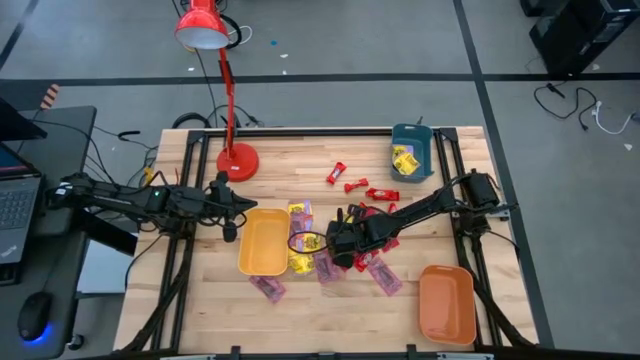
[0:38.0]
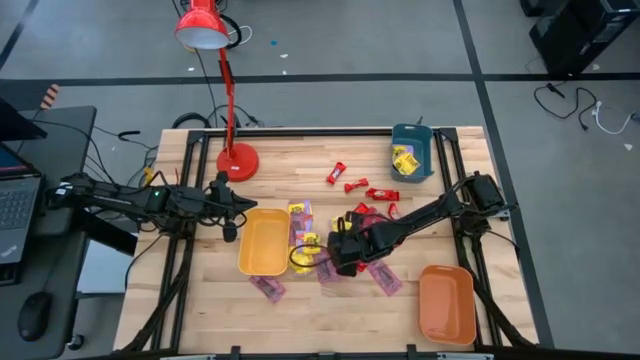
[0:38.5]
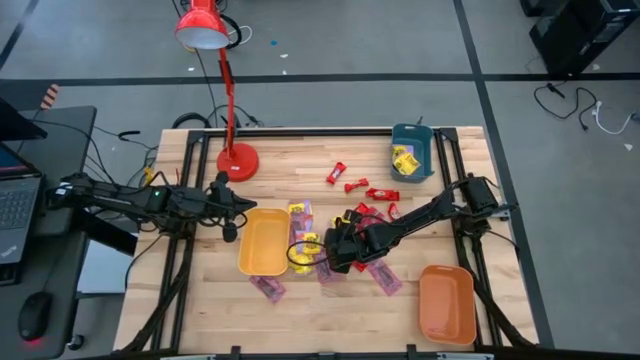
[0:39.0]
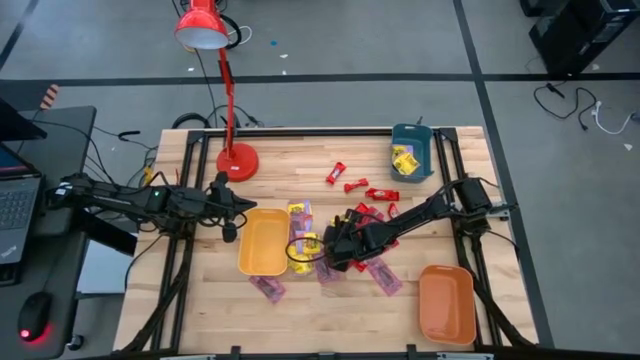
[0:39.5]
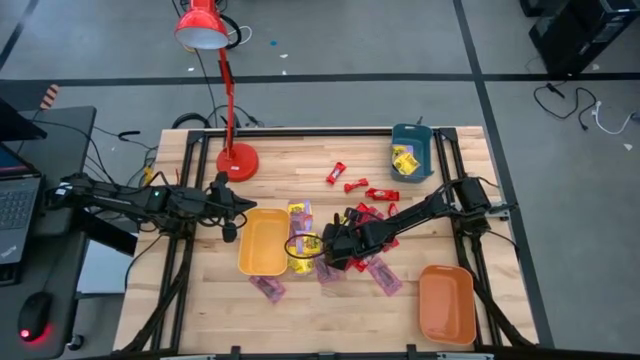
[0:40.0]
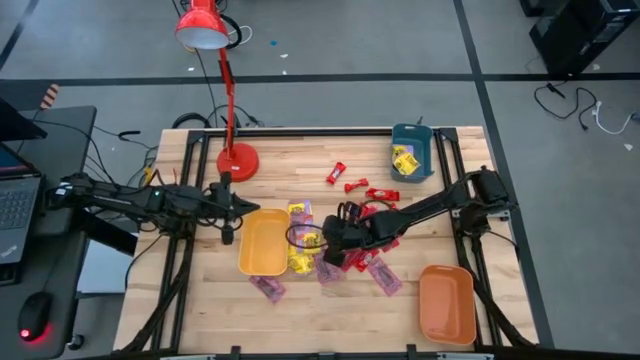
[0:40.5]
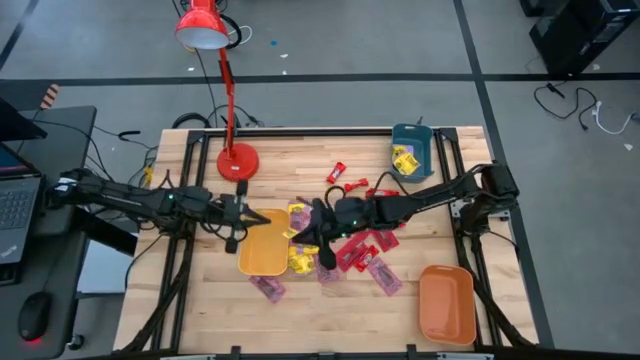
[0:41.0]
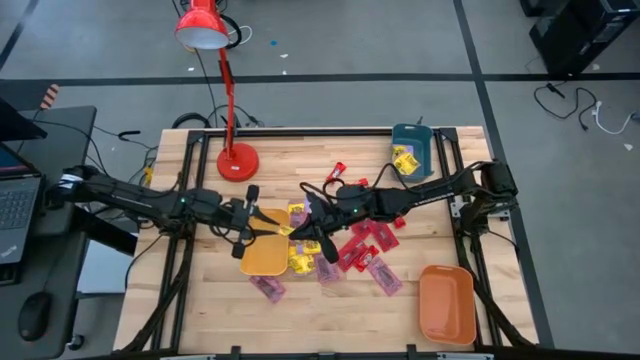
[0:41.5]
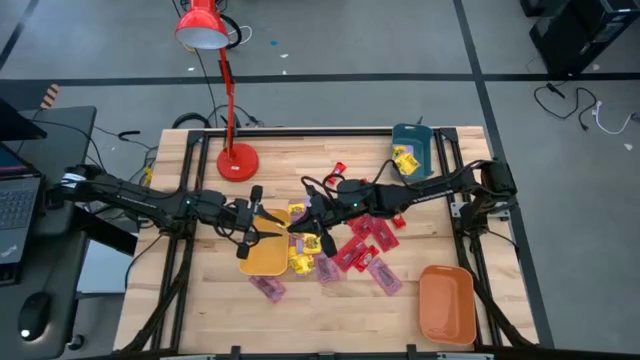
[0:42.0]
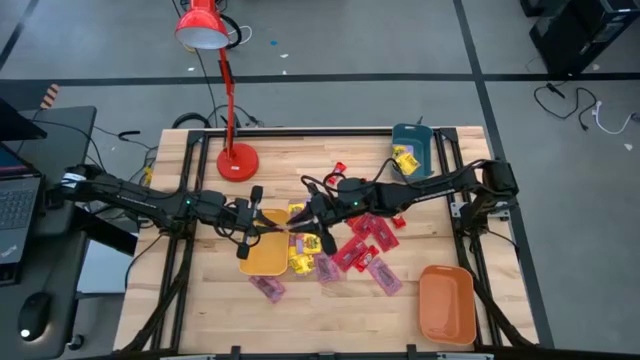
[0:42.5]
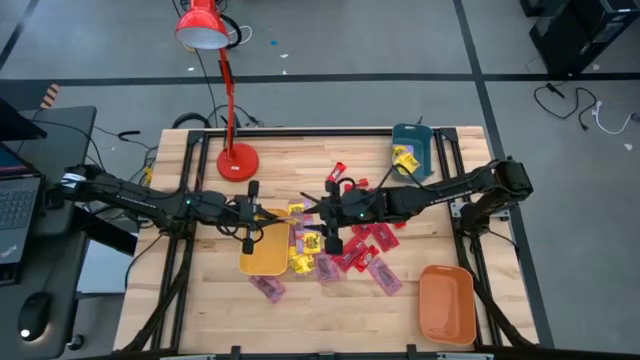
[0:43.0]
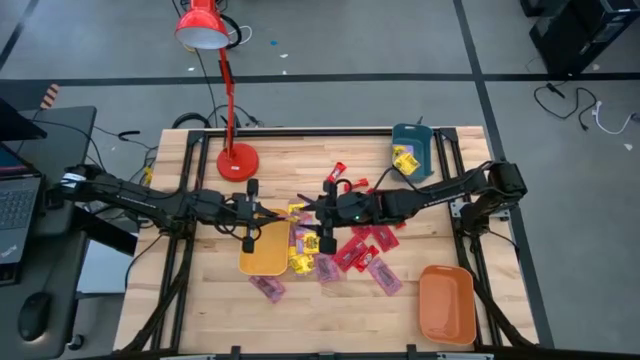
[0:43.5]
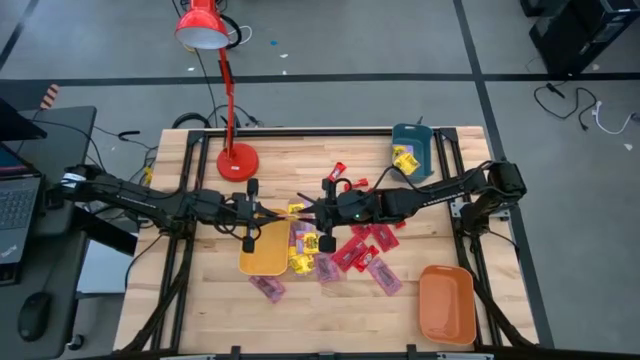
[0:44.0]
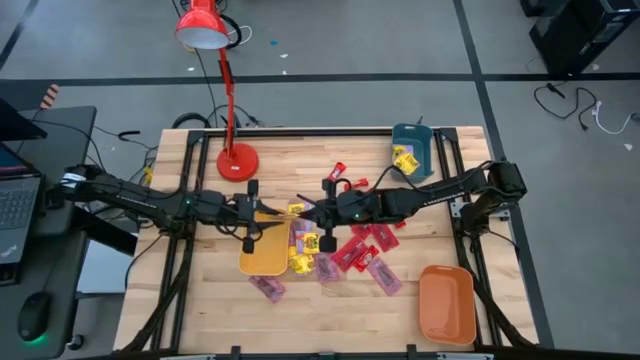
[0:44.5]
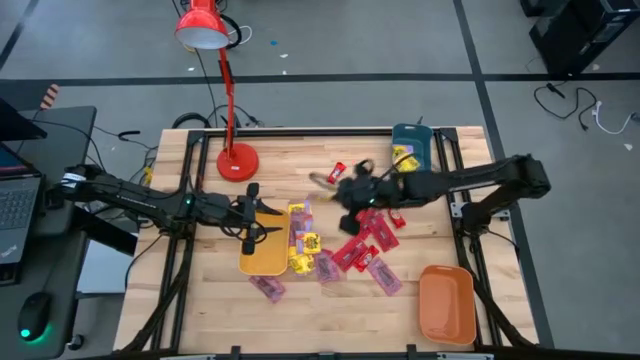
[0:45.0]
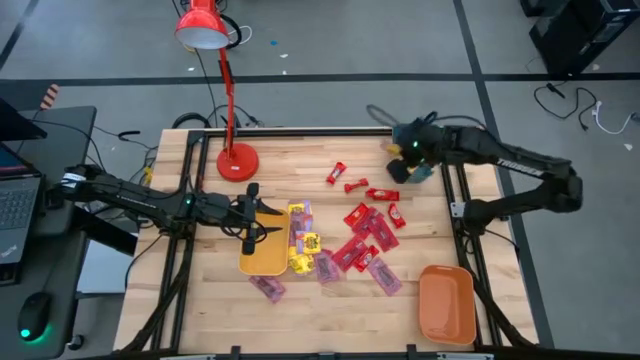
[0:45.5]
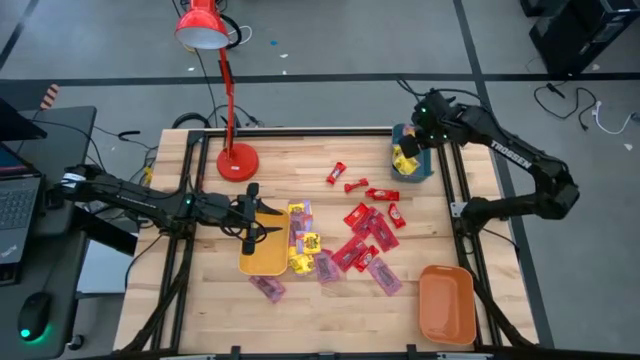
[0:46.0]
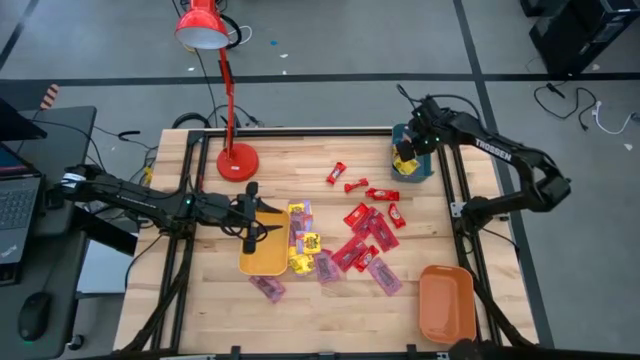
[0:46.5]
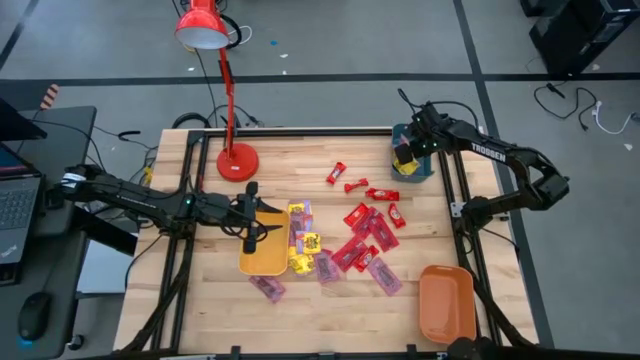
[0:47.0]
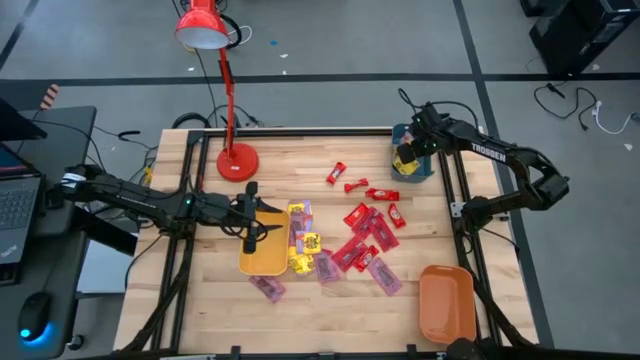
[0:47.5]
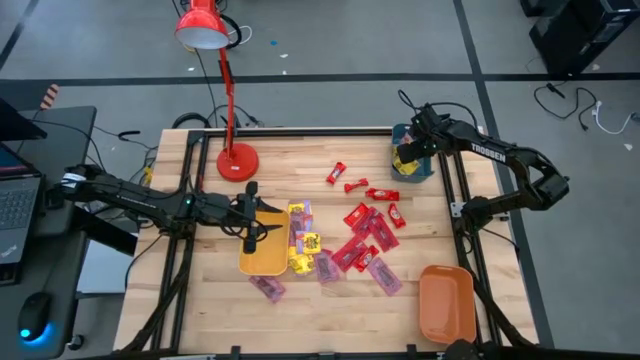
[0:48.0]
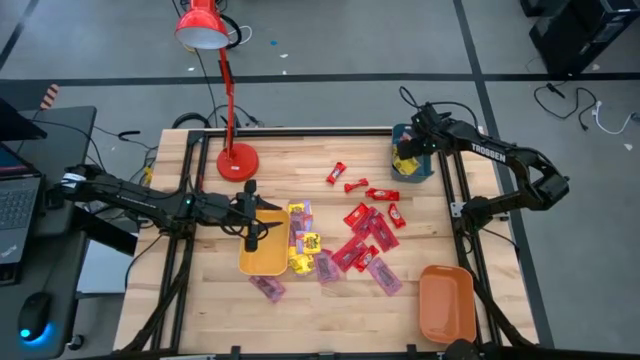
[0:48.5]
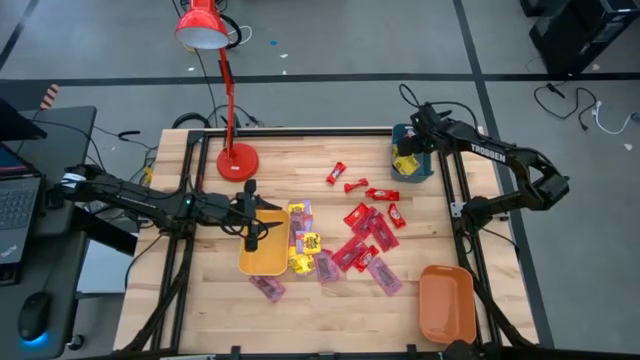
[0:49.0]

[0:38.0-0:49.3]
Task: Sort candy
Put the yellow candy pack into the blue bin

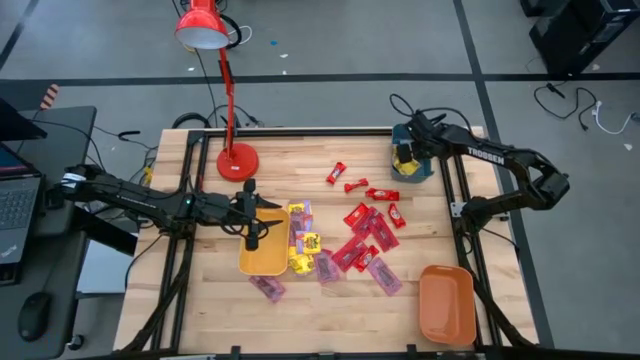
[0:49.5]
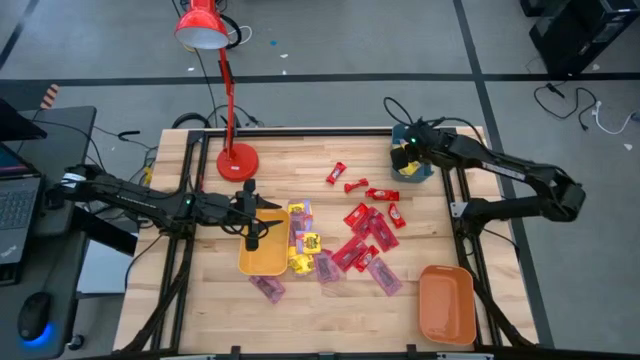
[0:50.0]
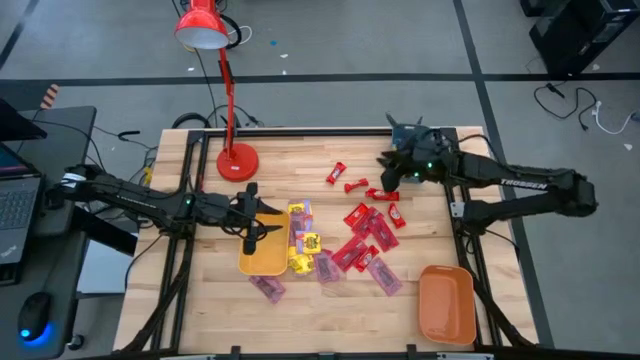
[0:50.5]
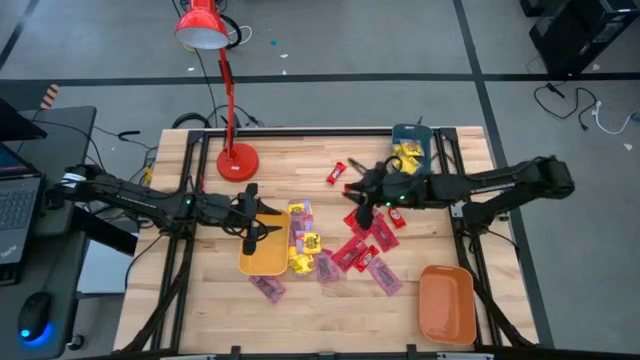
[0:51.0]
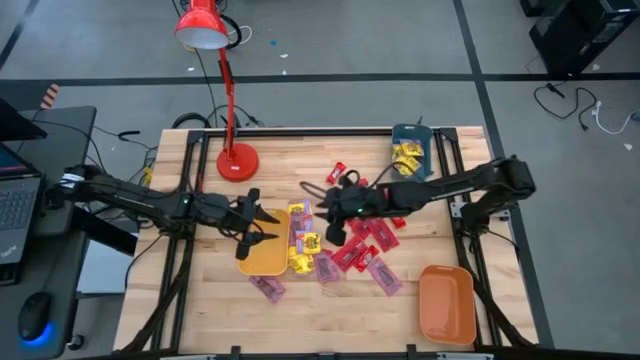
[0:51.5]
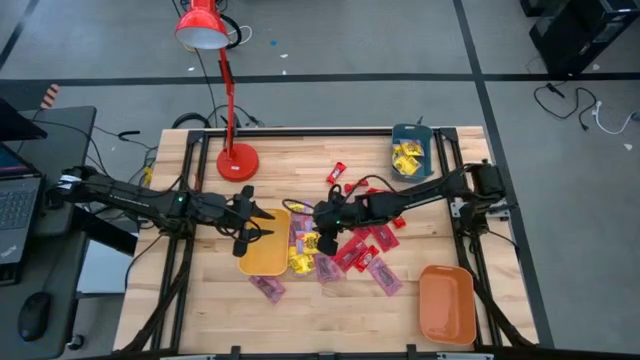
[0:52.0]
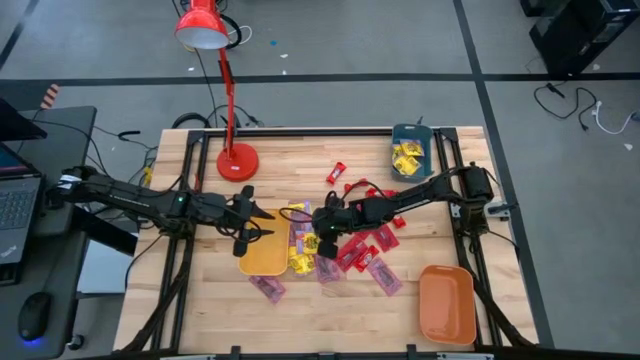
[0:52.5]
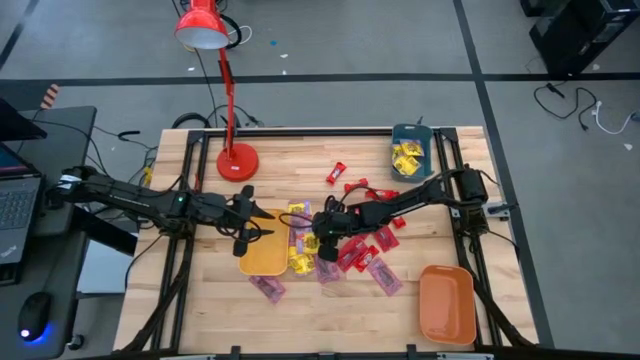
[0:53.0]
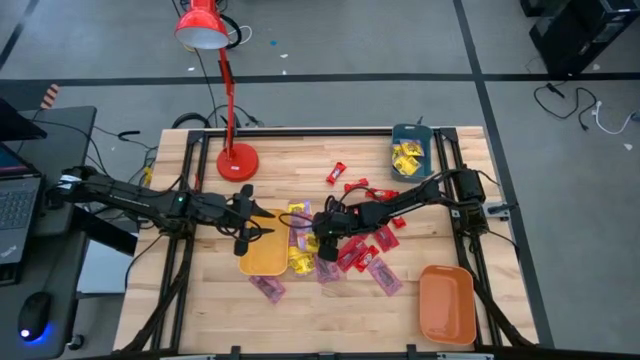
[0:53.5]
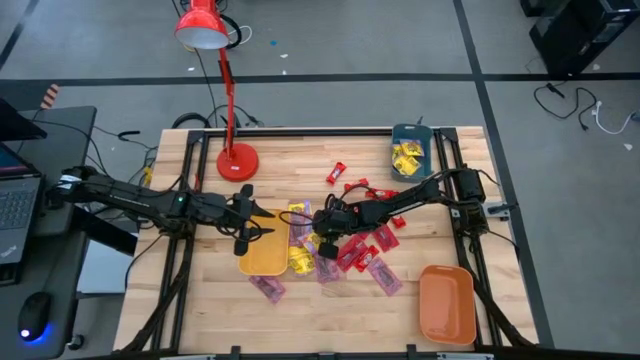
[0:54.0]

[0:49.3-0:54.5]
Put the yellow candy pack into the blue bin

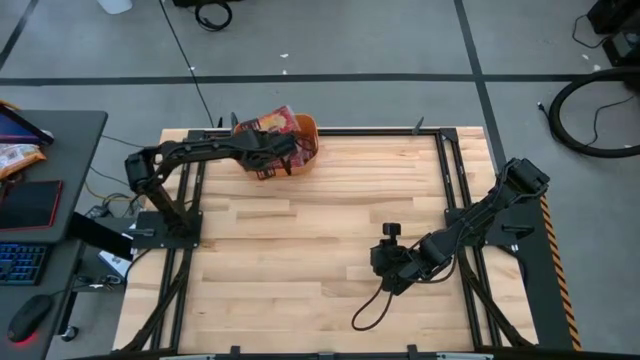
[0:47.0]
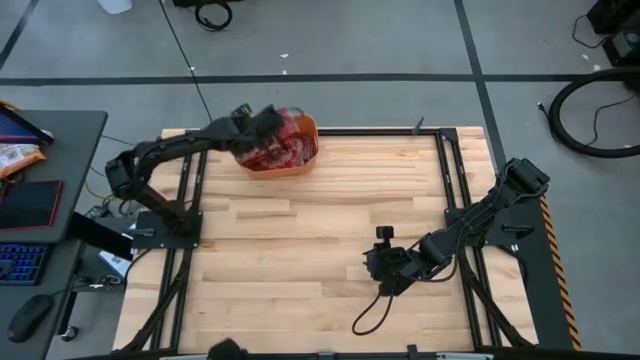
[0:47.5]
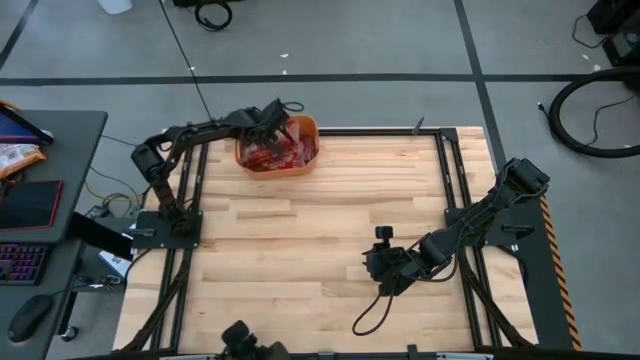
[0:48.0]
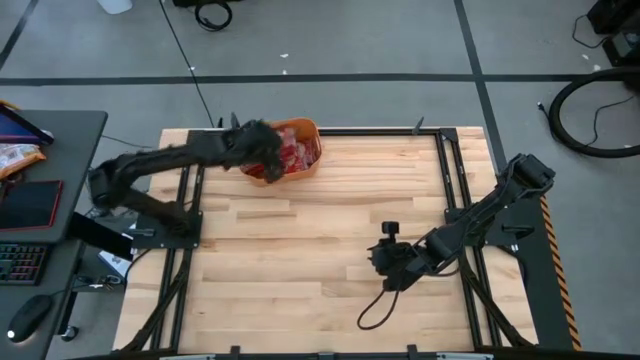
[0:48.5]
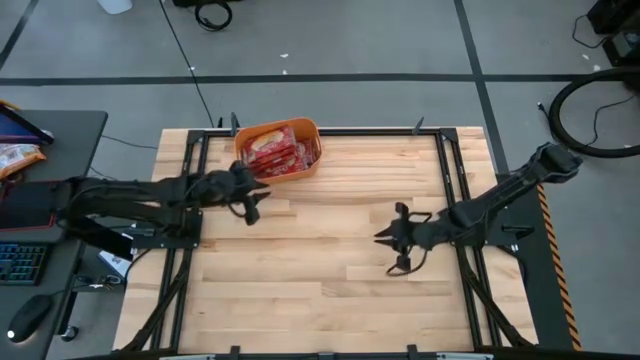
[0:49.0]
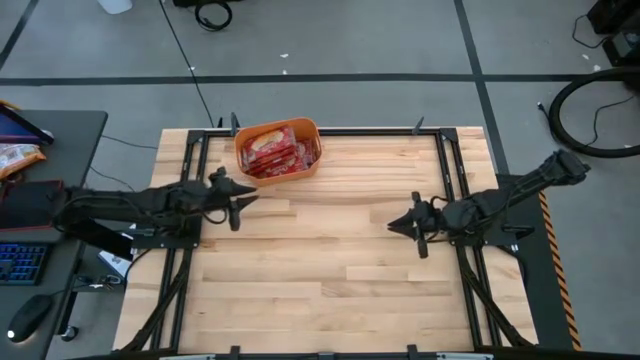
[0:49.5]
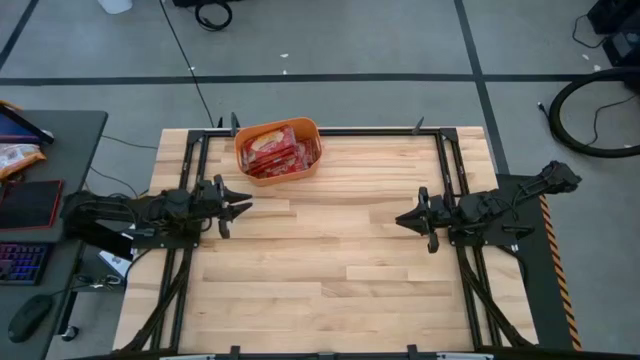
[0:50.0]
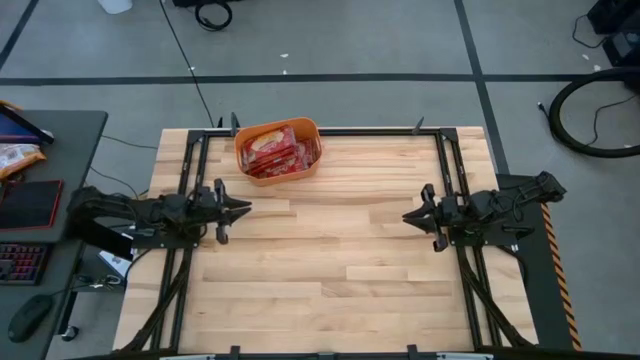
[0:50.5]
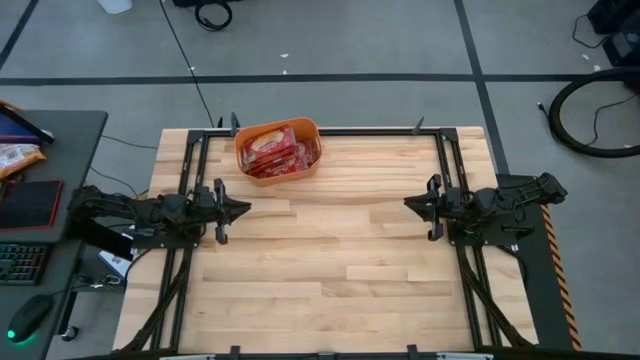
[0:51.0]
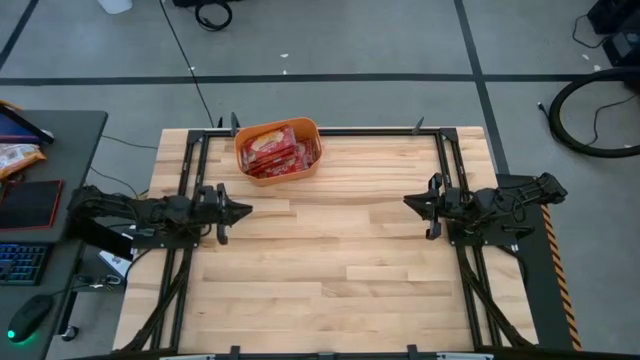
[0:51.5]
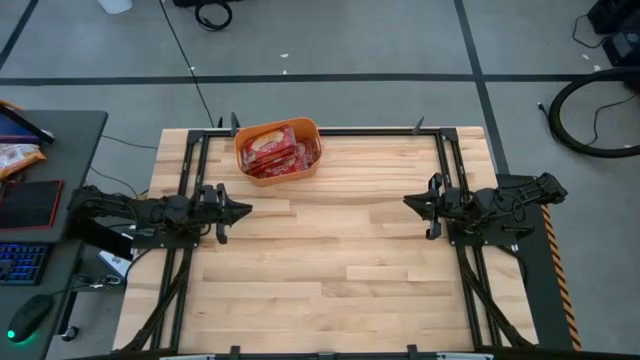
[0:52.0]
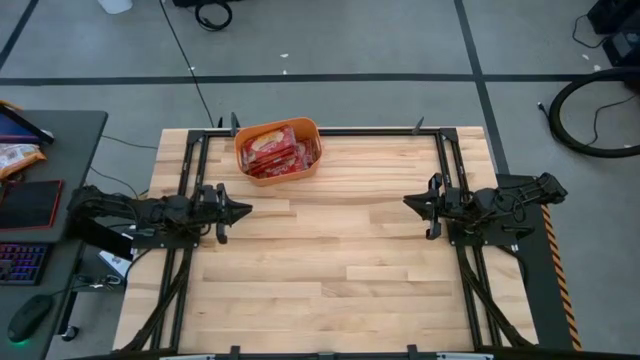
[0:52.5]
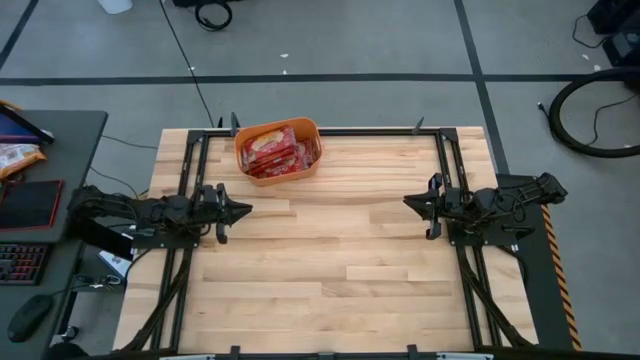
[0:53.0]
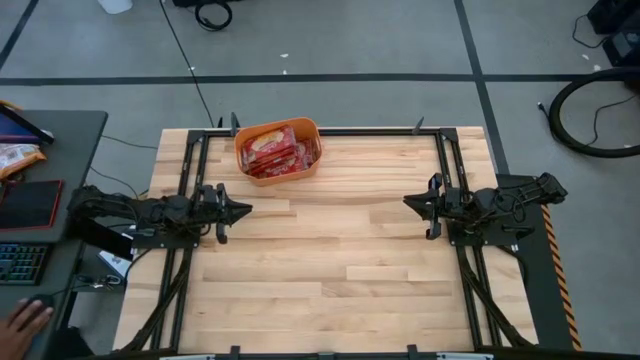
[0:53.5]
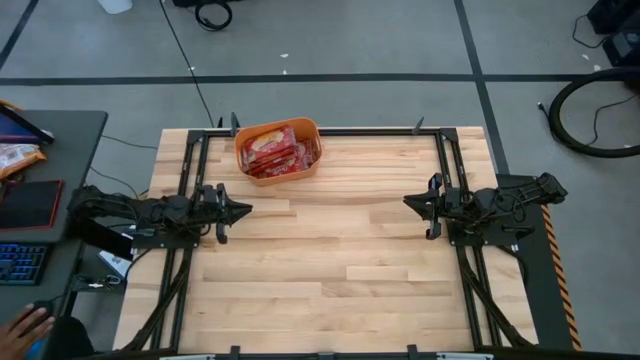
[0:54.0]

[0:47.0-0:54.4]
Task: Sort popcorn bags into baskets
Return to Home Position
